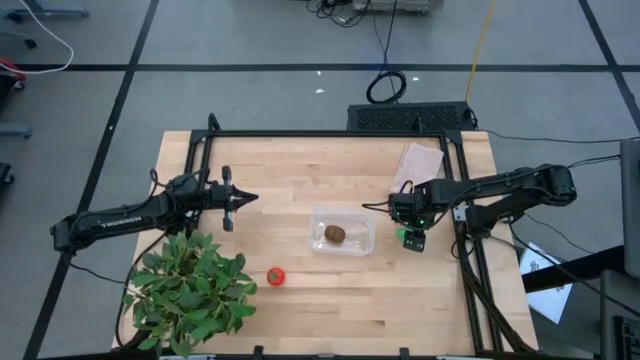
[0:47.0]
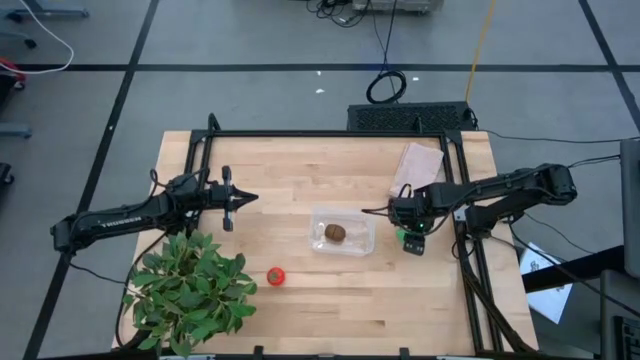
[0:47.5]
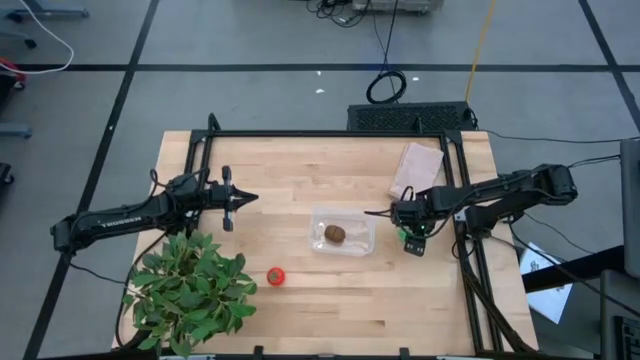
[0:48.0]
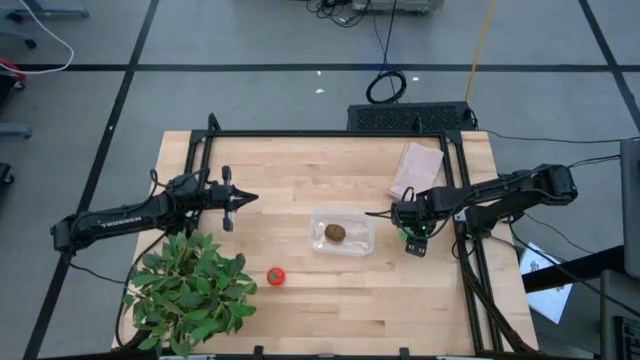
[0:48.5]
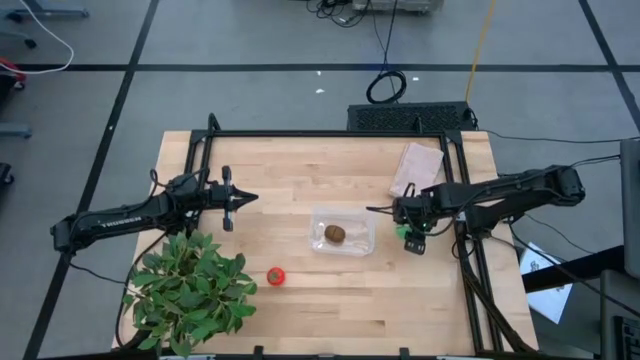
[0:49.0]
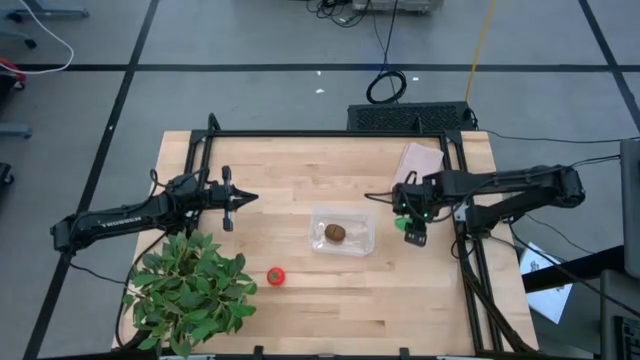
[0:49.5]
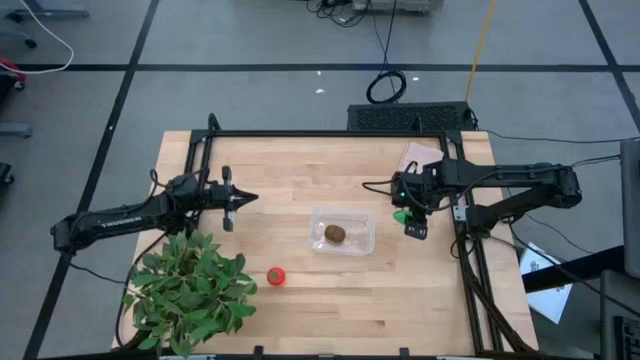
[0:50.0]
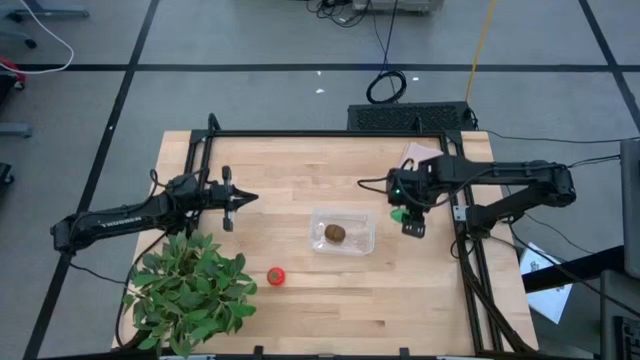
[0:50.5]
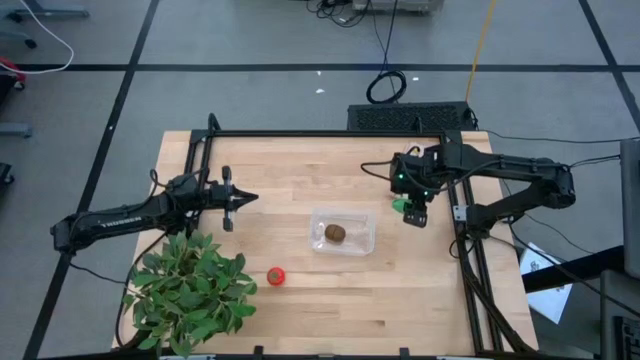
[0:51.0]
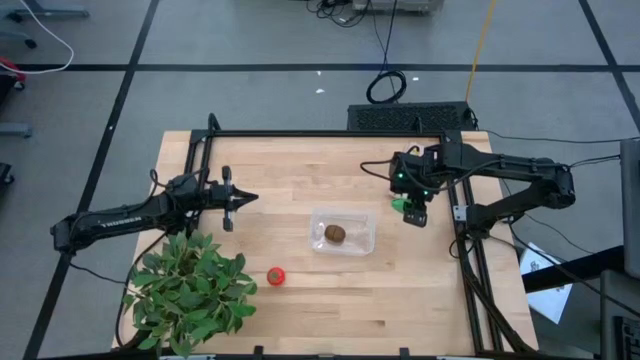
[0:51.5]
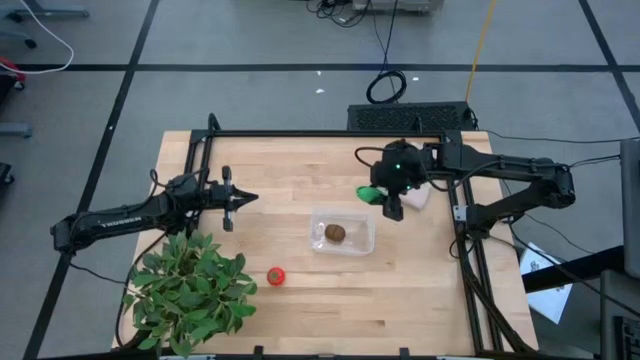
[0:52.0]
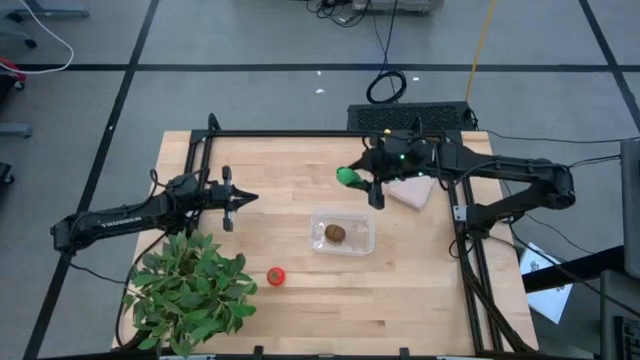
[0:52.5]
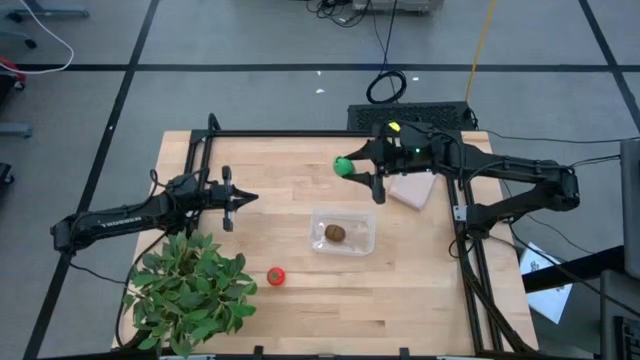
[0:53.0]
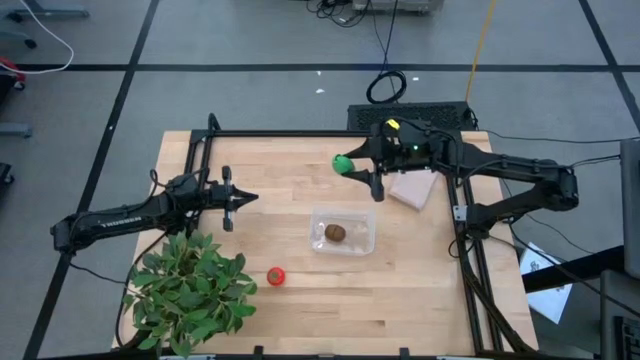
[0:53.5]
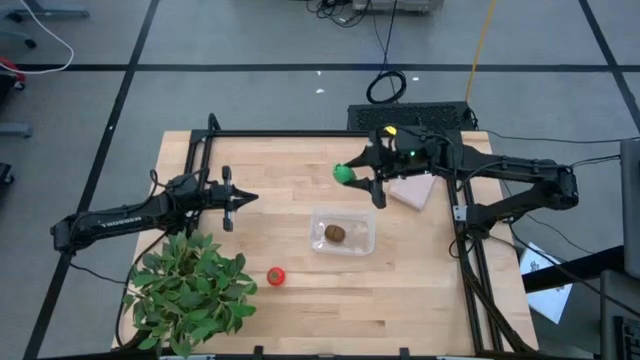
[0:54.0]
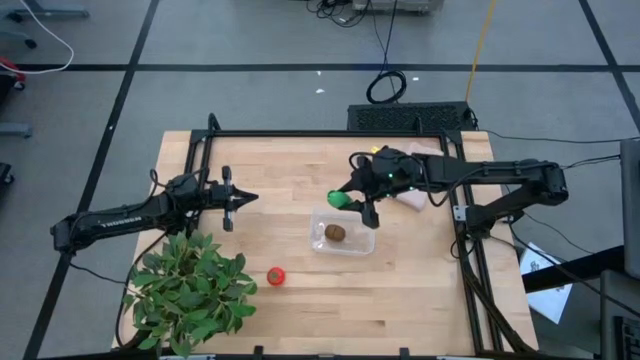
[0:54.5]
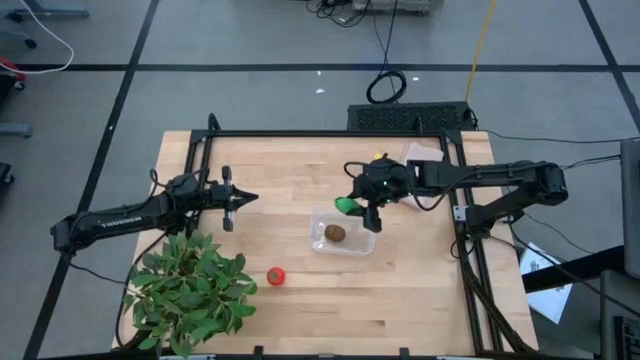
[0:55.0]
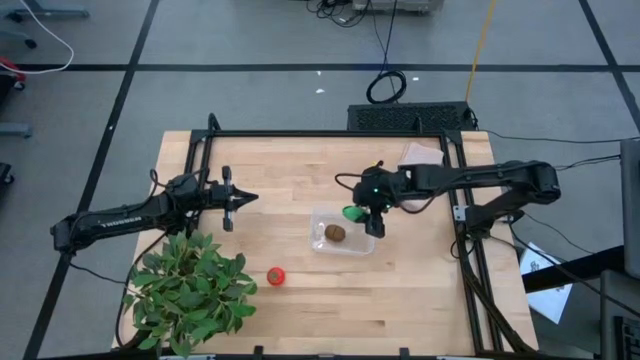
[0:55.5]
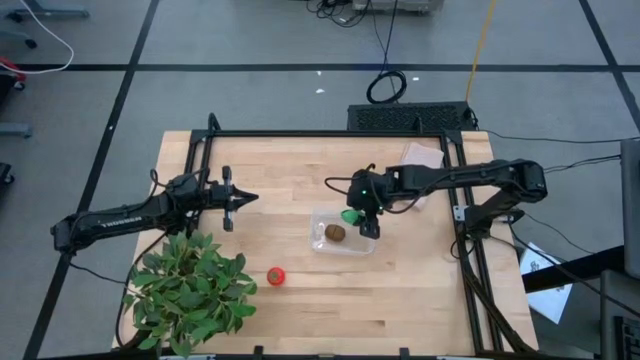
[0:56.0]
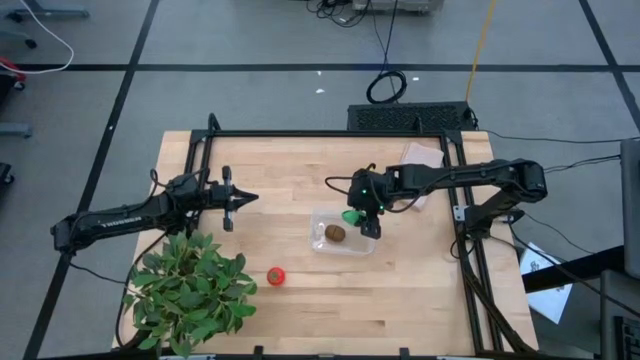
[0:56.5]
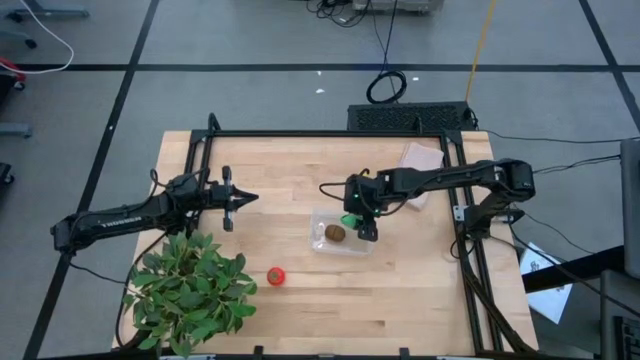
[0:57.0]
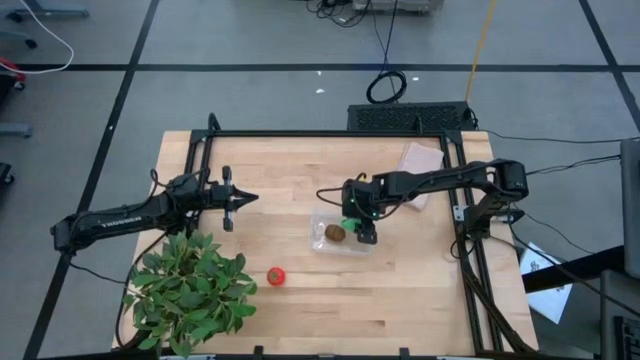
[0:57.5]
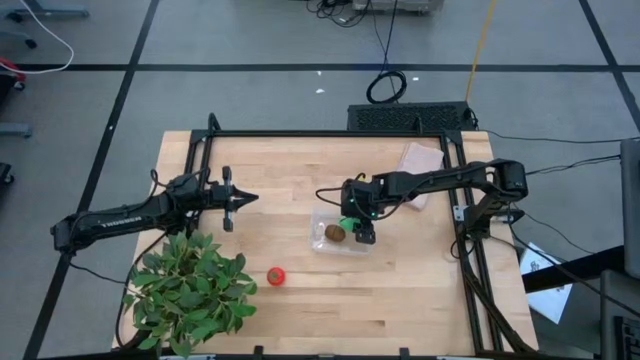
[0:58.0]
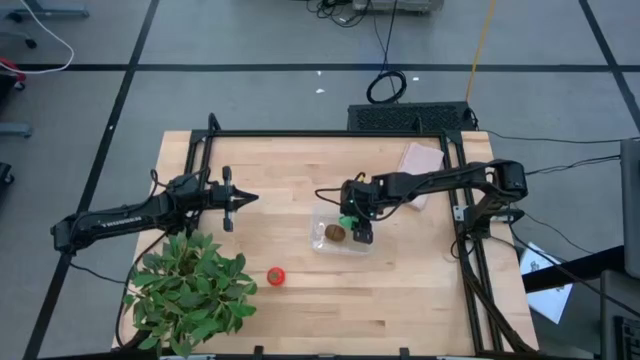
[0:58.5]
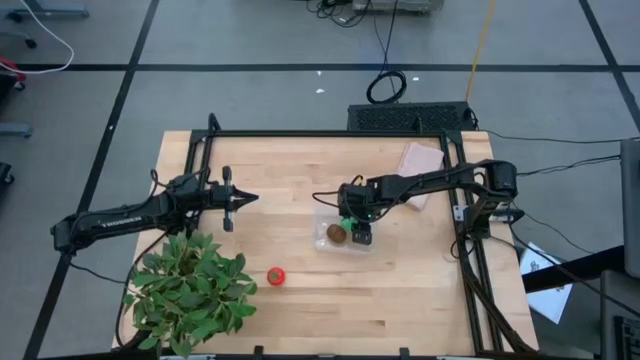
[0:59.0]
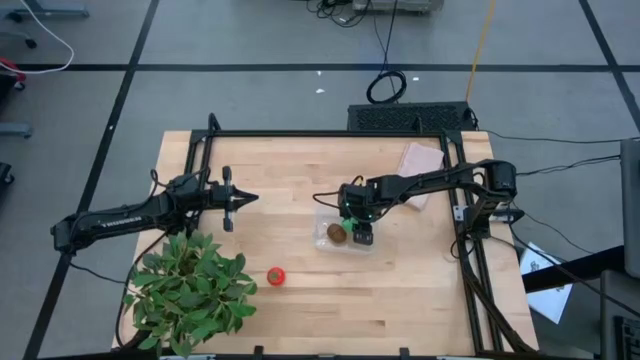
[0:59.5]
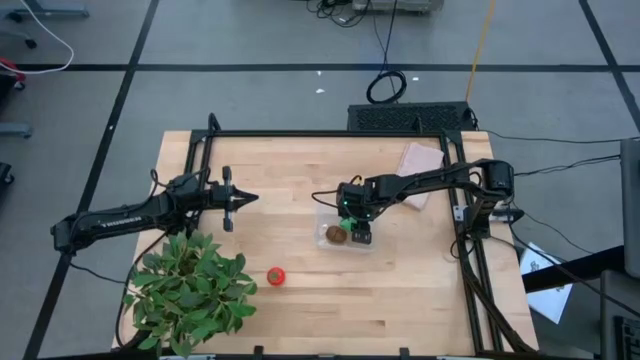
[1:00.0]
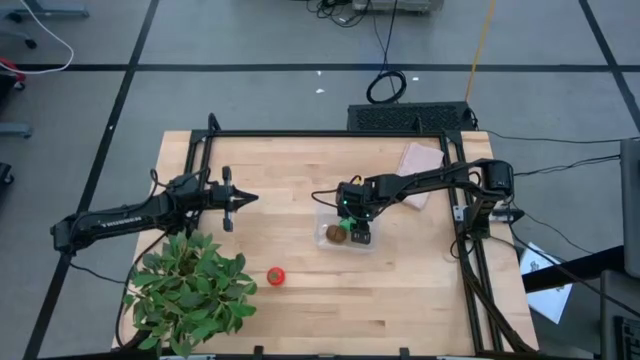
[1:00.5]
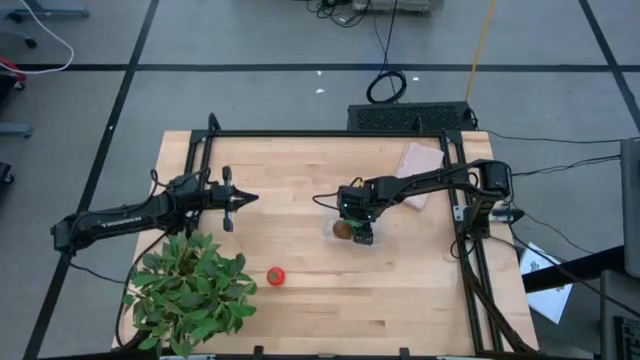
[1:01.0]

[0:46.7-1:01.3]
Task: Pick and placing Produce into tupperware
Put the green corn into the transparent bin
